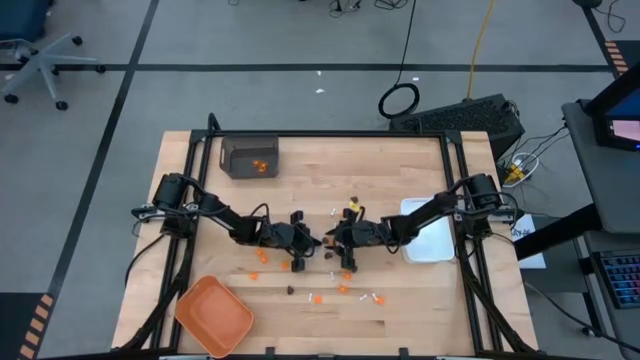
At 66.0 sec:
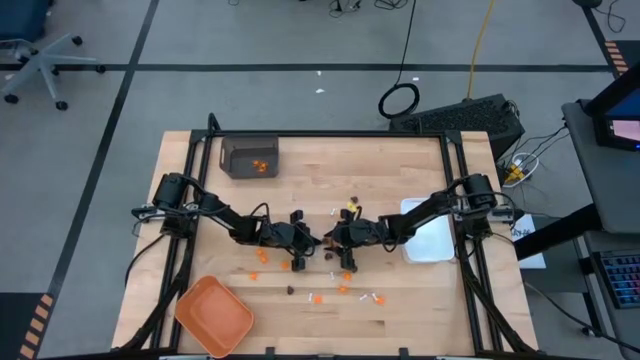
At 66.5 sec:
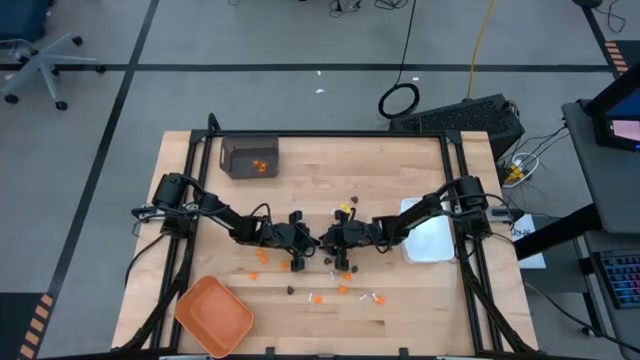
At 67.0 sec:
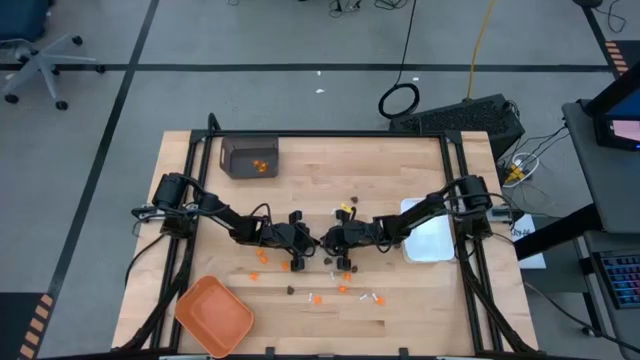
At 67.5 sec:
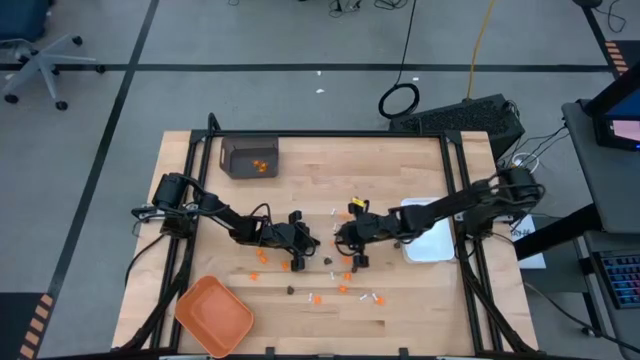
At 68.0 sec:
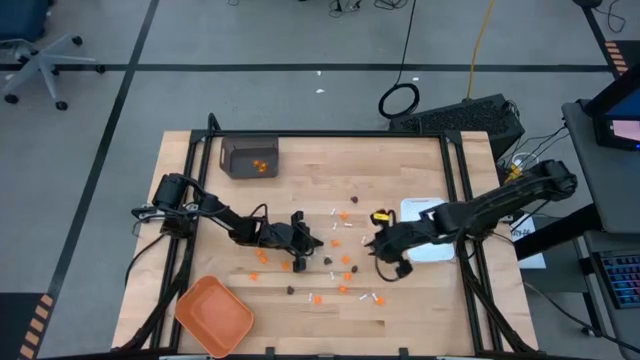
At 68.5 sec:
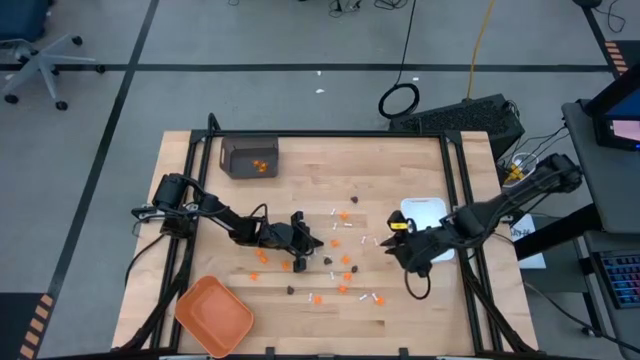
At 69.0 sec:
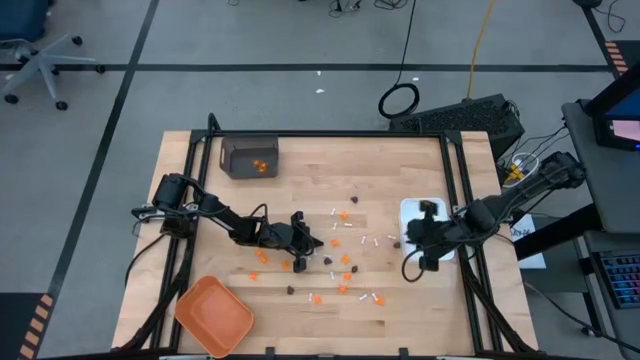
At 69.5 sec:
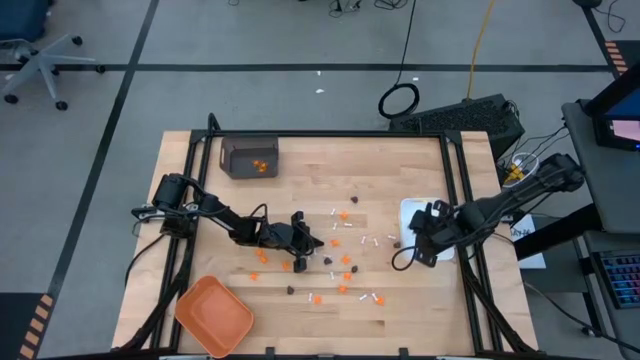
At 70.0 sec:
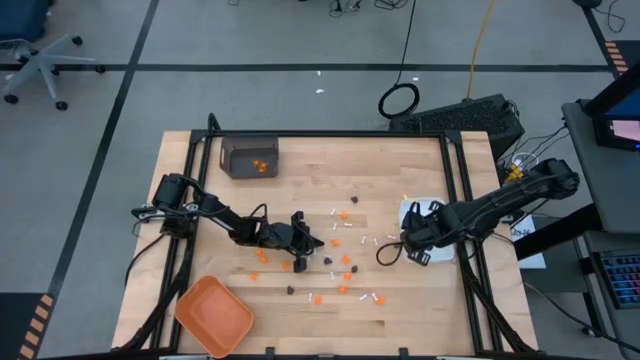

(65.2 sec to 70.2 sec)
Task: Sort Halloween decoration
Put the black skull toy into the white bin

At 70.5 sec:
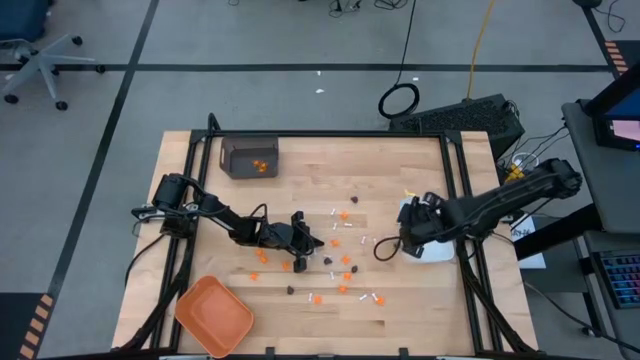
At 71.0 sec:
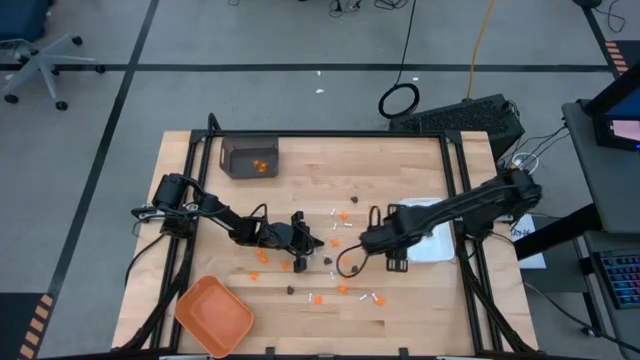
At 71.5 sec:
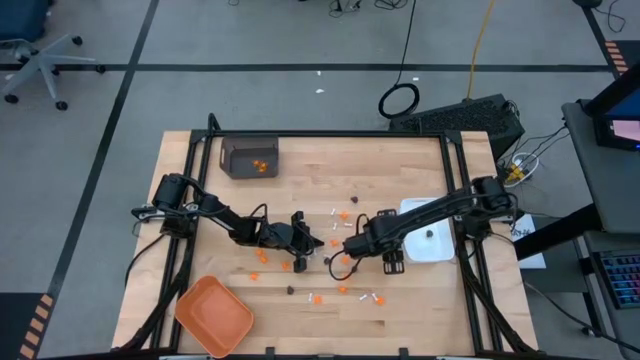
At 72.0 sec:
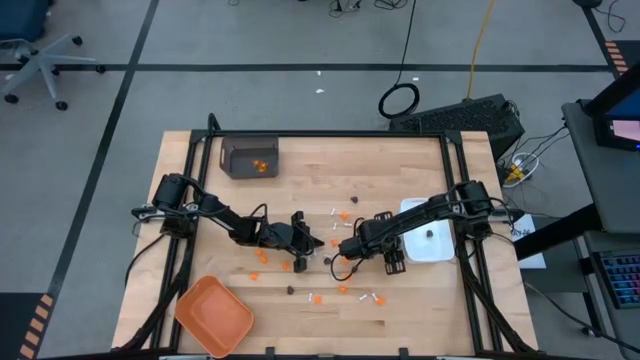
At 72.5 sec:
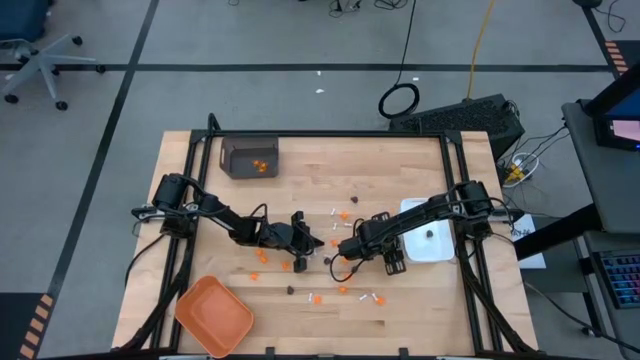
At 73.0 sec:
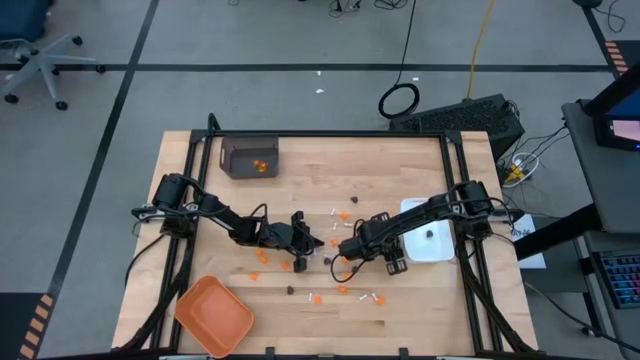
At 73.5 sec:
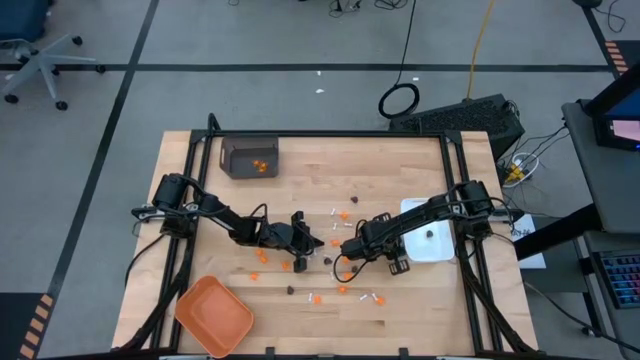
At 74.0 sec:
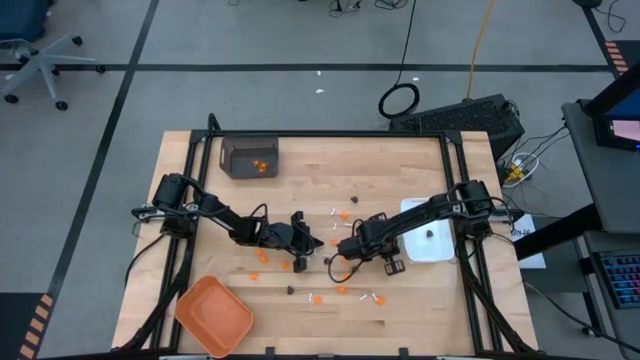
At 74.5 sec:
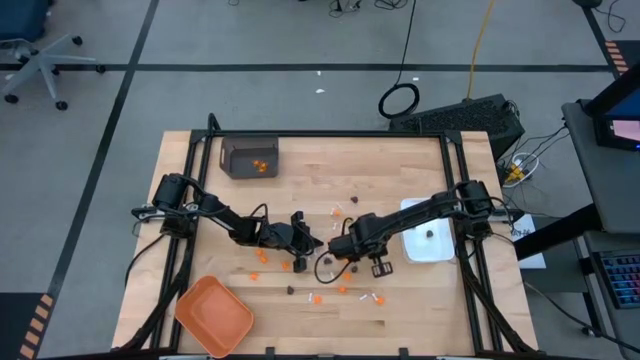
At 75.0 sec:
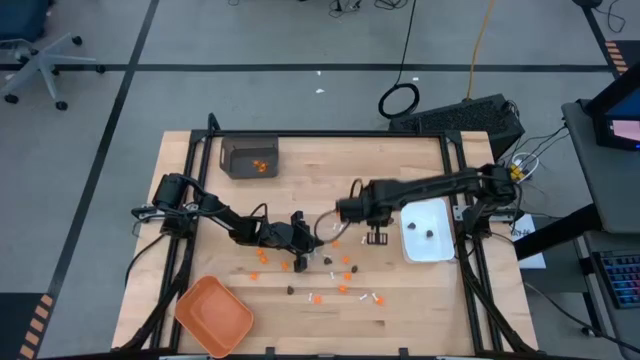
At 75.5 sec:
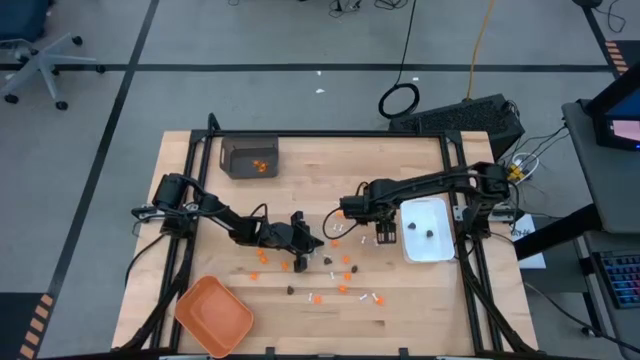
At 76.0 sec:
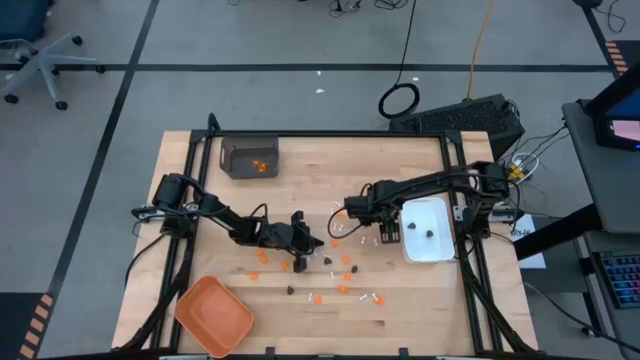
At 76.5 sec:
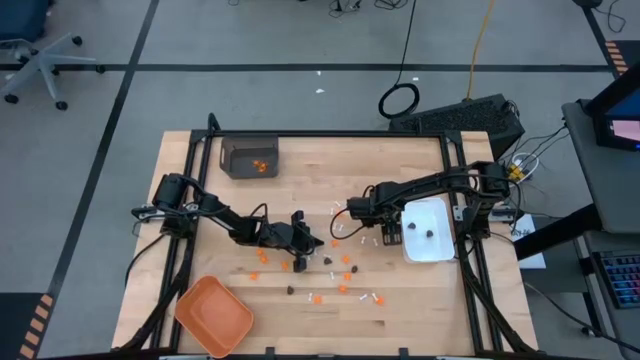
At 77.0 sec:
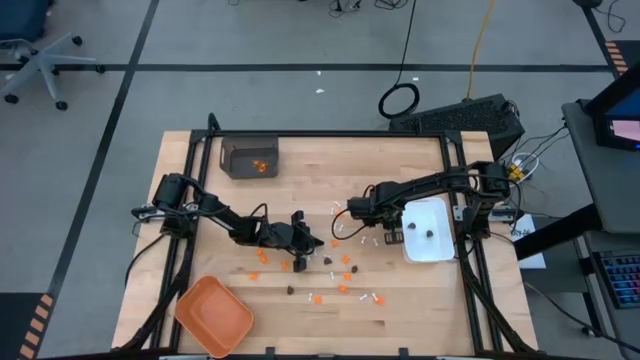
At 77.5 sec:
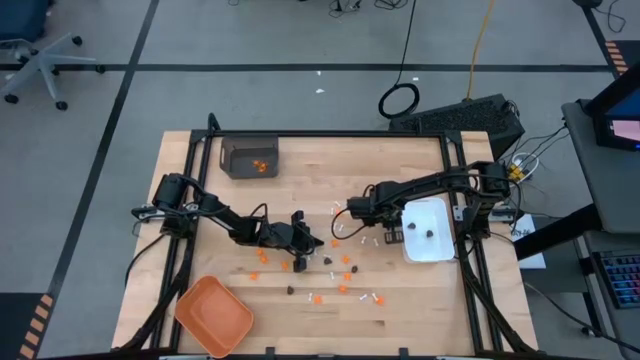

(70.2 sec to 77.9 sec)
Put the black skull toy into the white bin

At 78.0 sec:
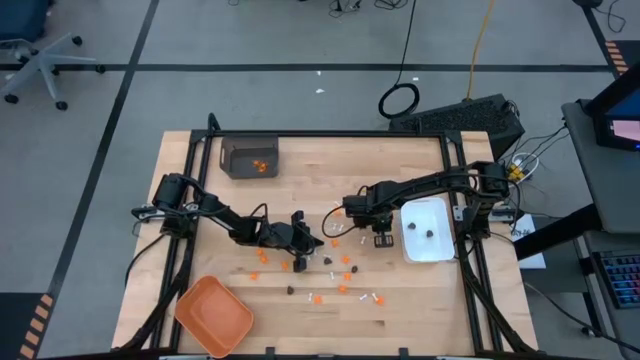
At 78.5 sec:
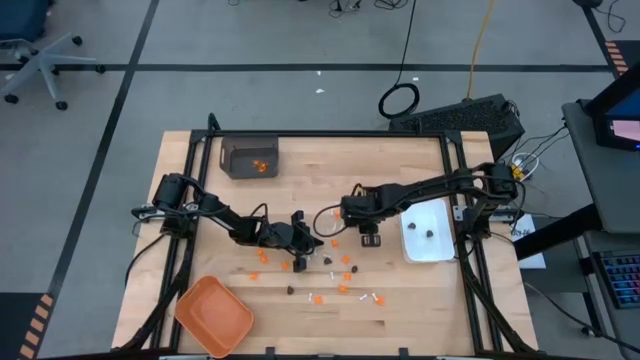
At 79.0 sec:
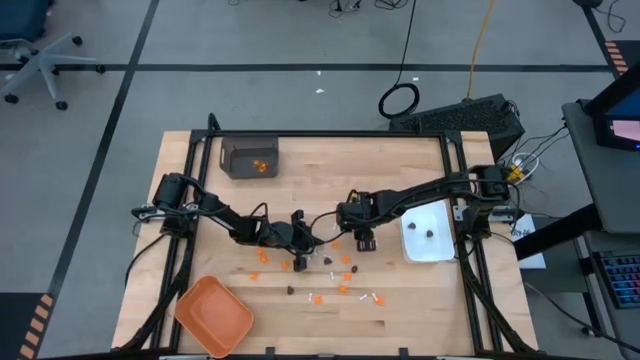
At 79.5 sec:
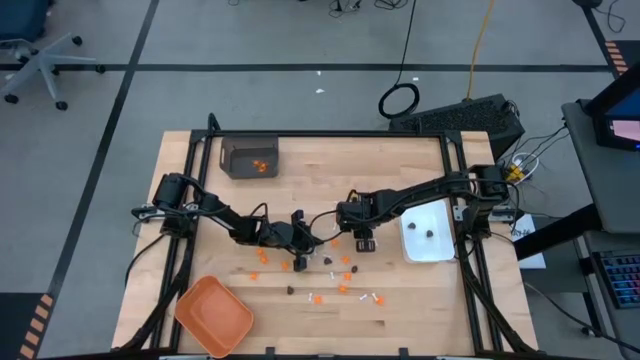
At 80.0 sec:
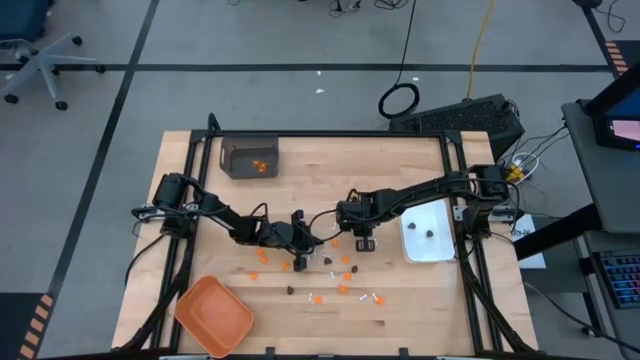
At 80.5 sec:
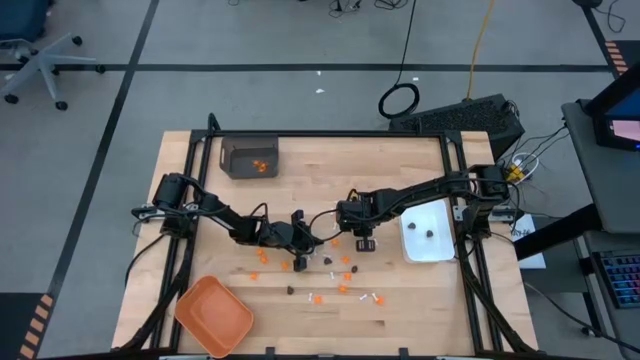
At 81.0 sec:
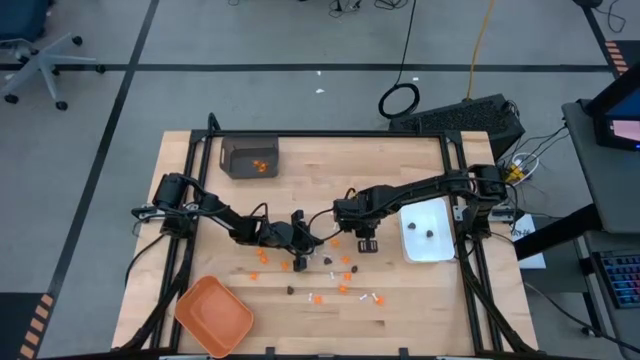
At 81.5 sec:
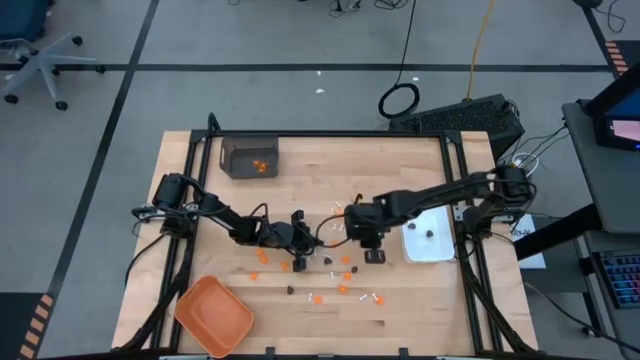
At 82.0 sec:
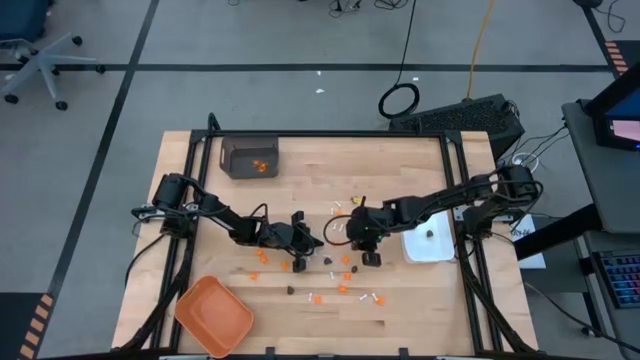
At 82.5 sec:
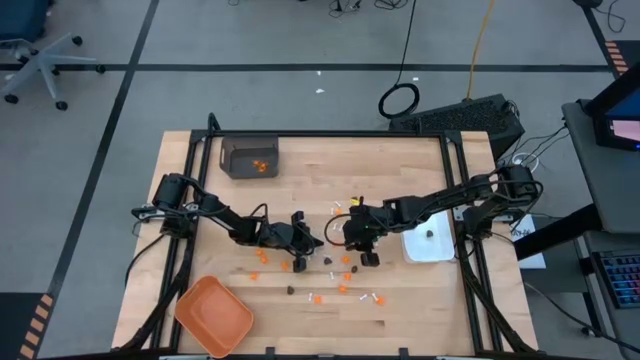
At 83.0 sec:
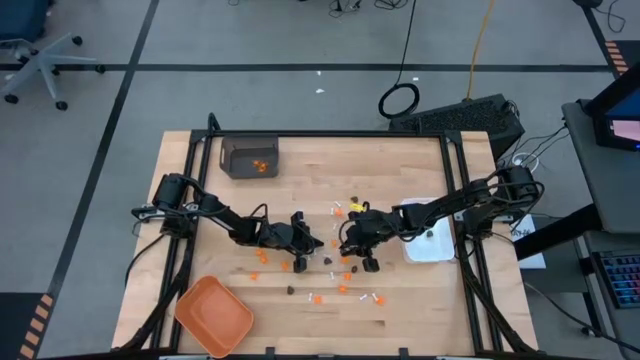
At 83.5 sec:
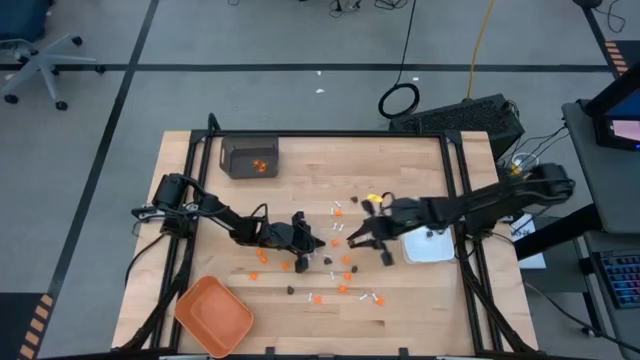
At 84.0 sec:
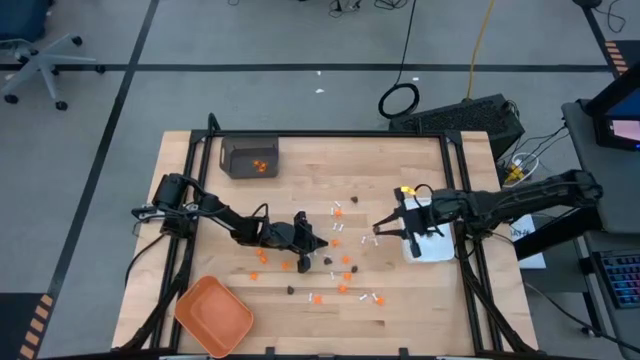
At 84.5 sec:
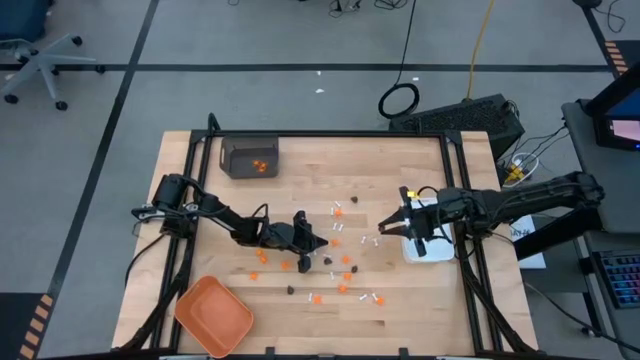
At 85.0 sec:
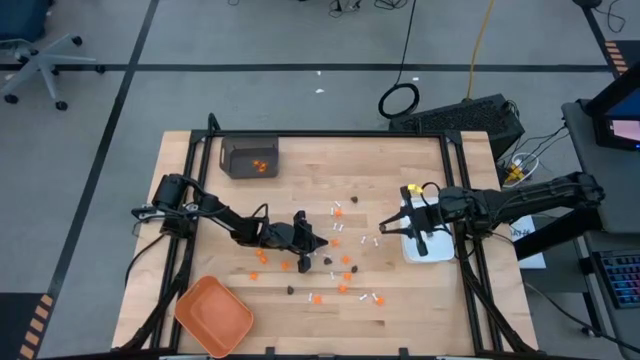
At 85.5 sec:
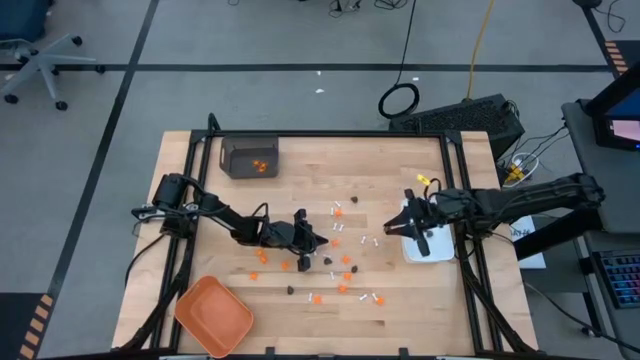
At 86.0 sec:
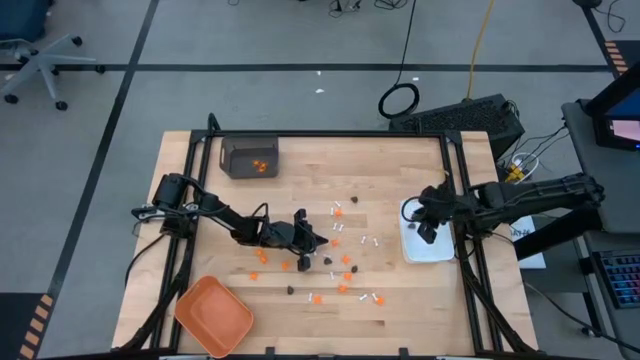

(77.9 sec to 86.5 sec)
Put the black skull toy into the white bin

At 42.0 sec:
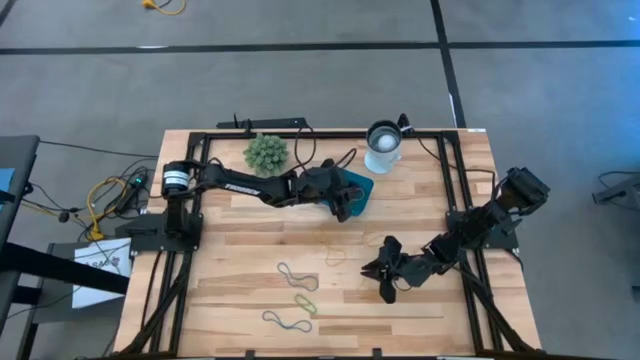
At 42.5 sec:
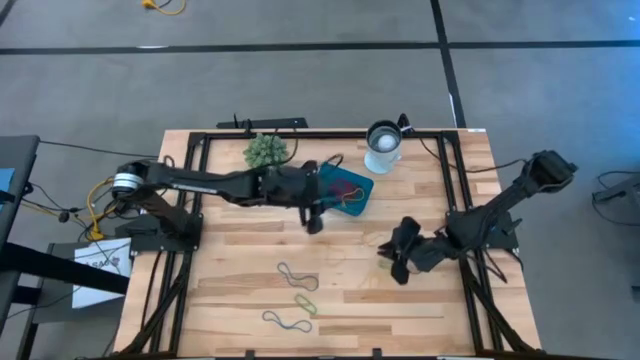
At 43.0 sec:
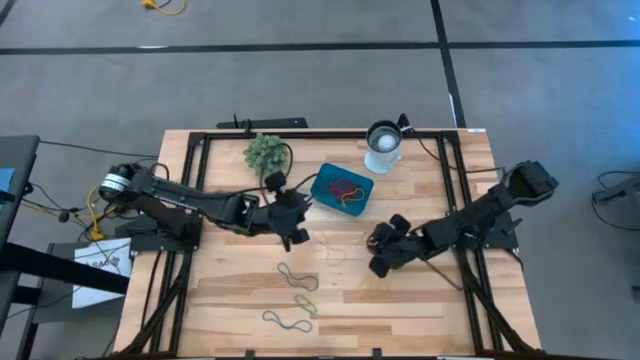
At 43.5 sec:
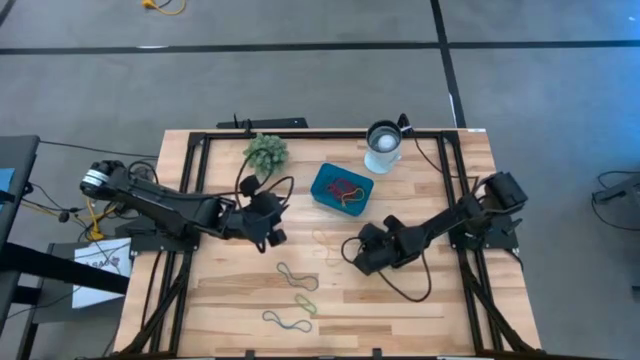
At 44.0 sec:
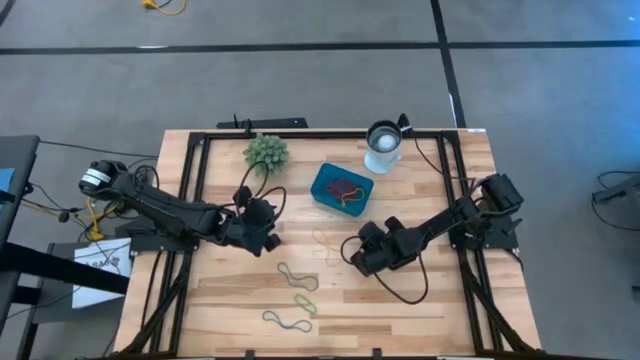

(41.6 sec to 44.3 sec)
Task: Pick and place items into bin
Put the yellow rubber band into the blue bin
